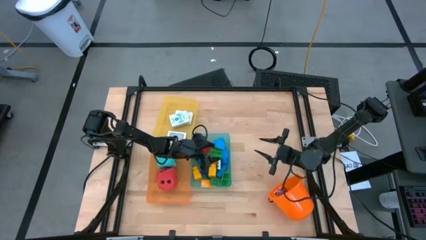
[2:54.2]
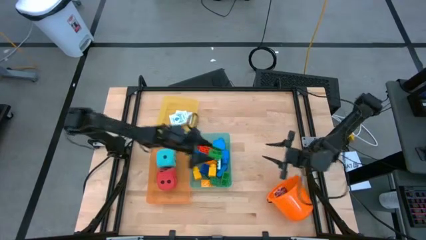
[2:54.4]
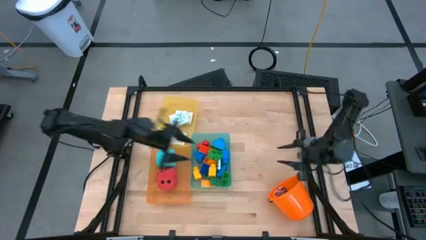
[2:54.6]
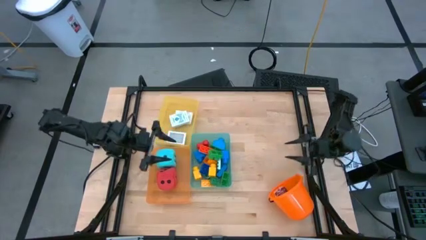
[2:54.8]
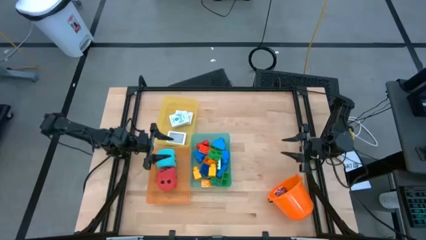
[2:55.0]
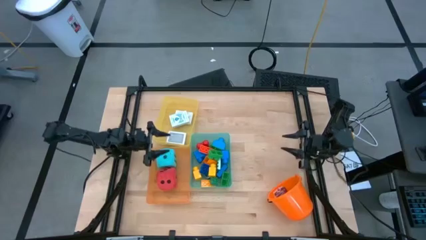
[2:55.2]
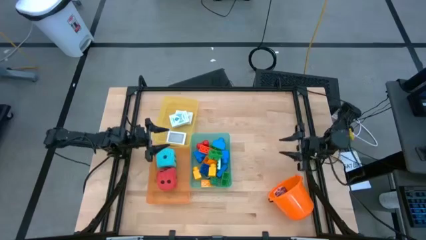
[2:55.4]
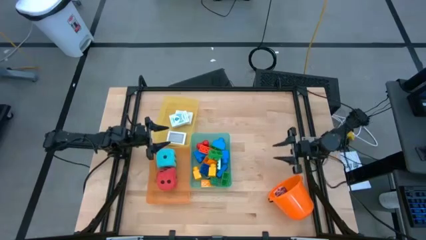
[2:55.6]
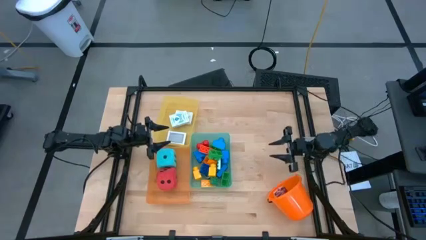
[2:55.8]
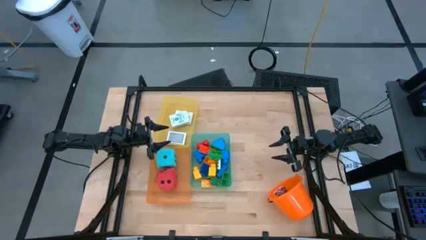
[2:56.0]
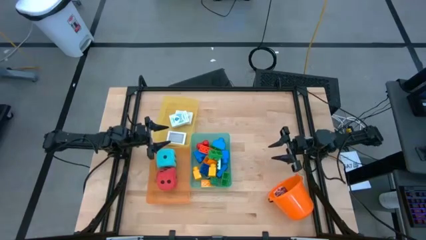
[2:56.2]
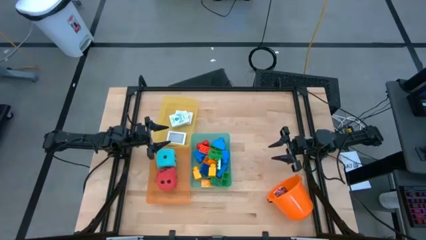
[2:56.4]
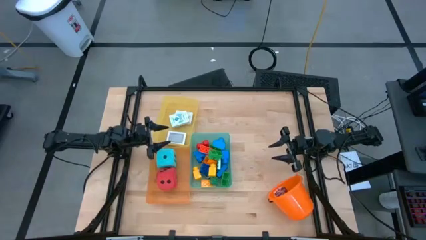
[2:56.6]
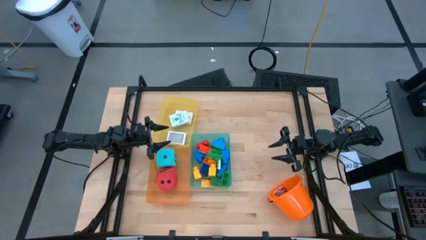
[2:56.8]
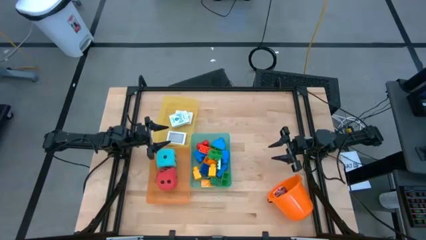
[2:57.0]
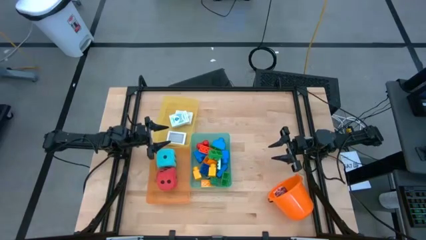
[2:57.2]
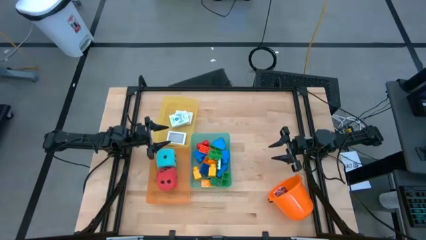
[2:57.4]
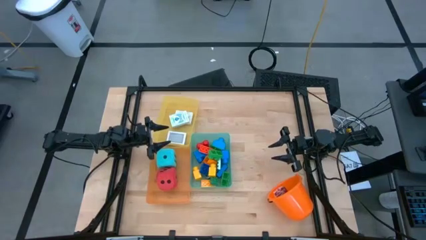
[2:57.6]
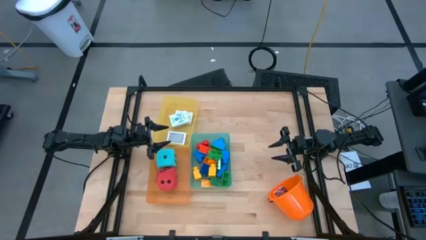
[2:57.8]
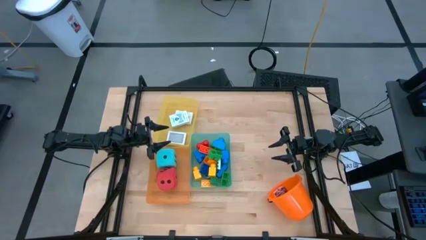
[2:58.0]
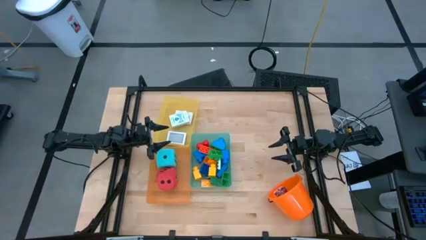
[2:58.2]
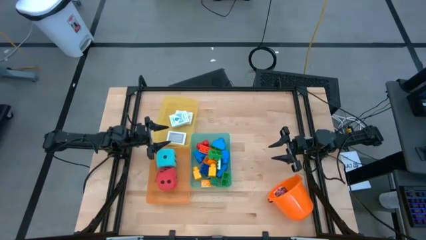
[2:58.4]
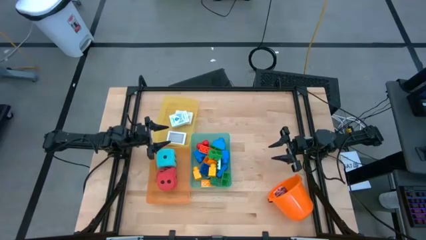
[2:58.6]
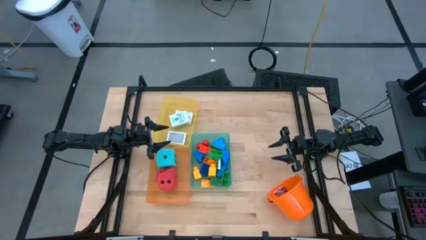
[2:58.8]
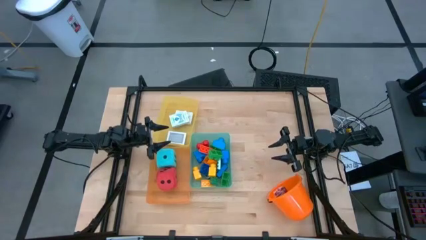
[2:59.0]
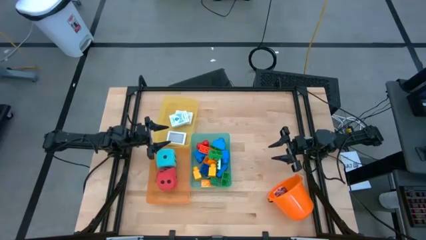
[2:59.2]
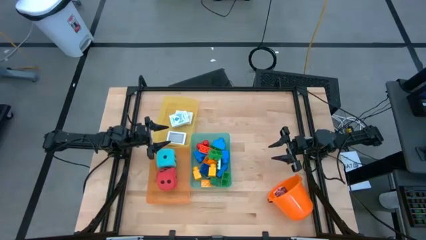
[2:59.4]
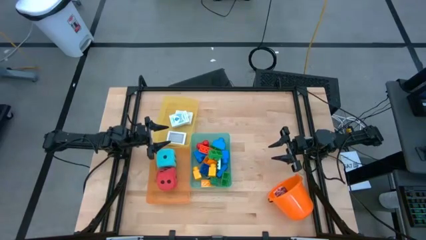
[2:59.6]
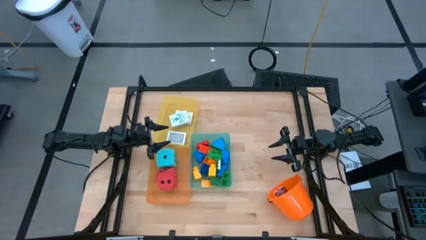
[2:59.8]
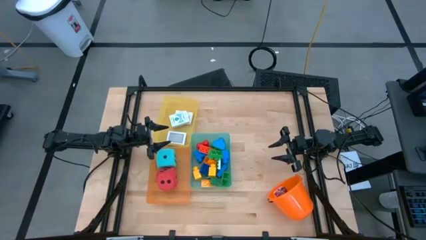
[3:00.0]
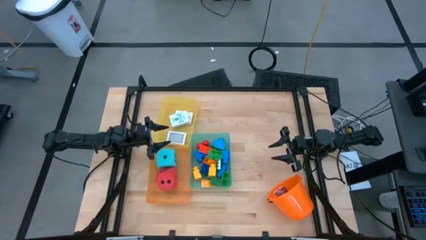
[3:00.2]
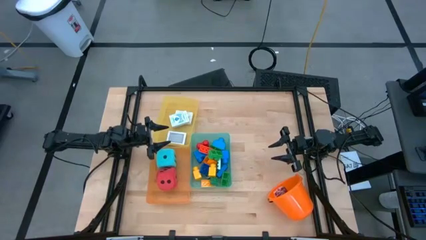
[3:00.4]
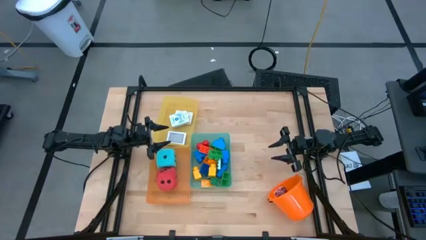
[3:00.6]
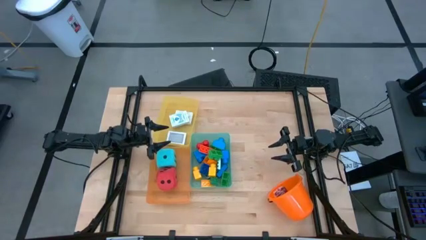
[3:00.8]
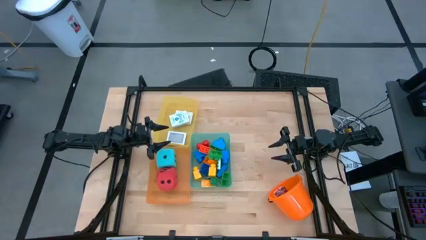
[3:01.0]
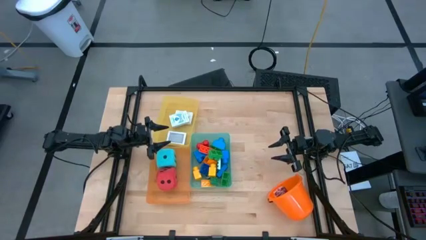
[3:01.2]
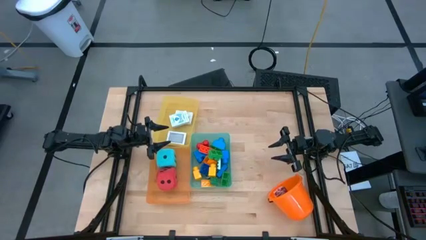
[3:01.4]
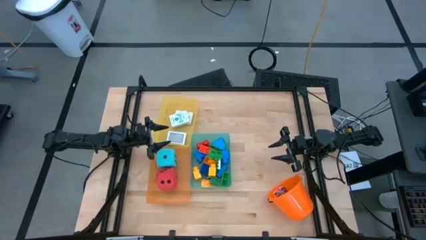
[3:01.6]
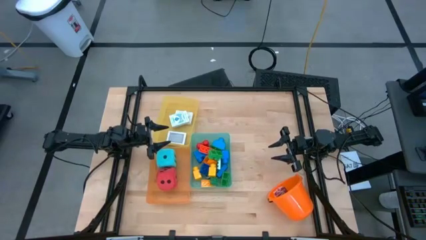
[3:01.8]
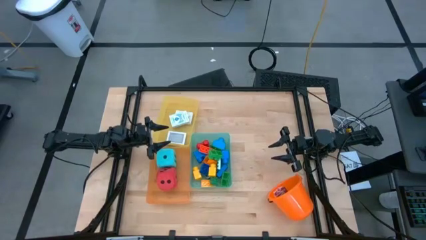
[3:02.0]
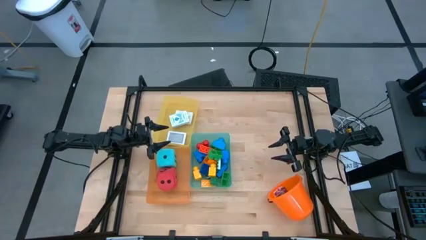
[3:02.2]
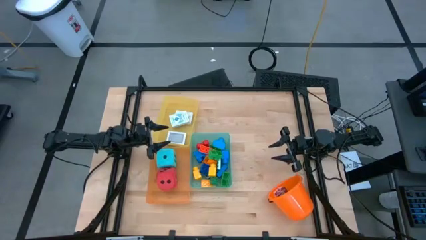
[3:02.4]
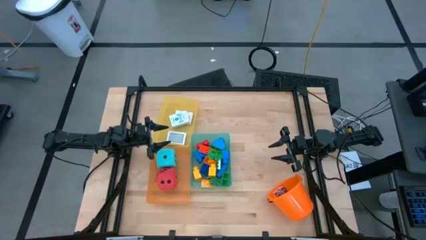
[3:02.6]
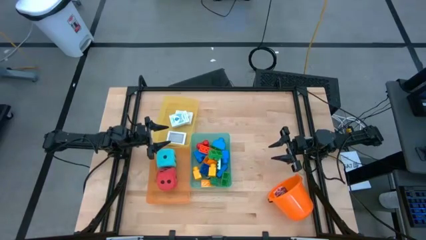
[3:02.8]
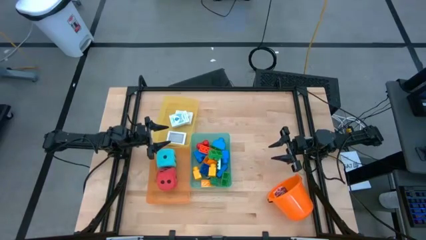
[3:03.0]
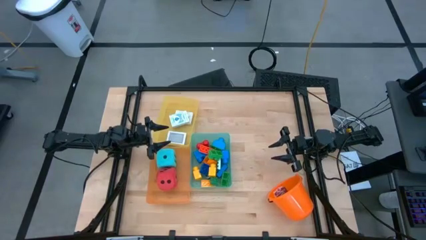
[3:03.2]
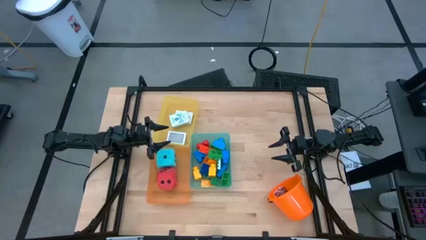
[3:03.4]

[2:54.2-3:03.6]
Task: Pick & Place Toys
Return to Home Position

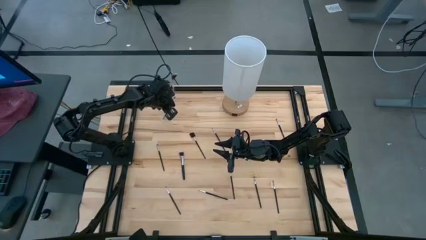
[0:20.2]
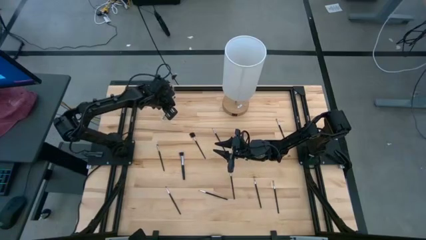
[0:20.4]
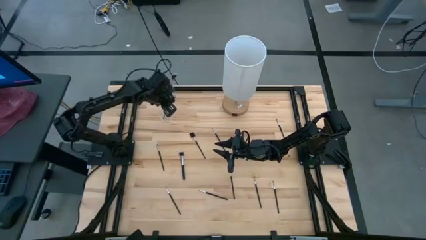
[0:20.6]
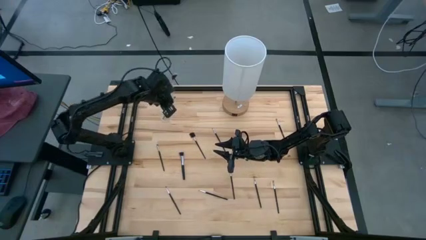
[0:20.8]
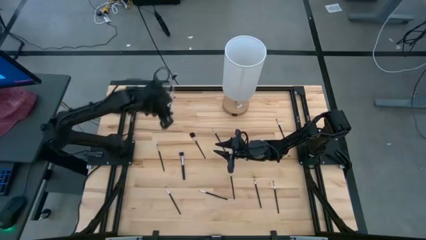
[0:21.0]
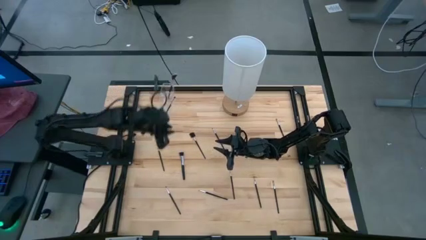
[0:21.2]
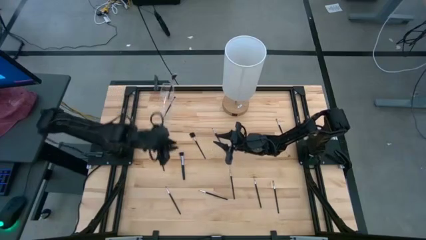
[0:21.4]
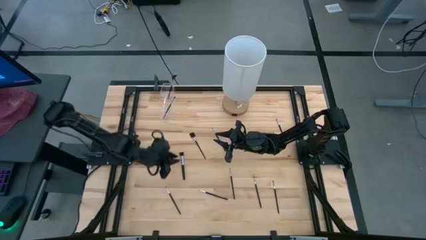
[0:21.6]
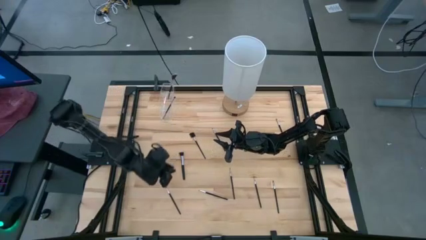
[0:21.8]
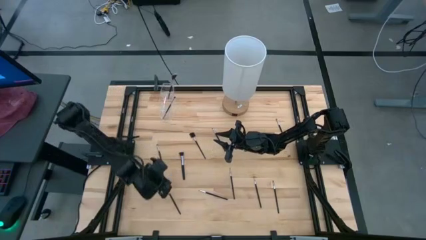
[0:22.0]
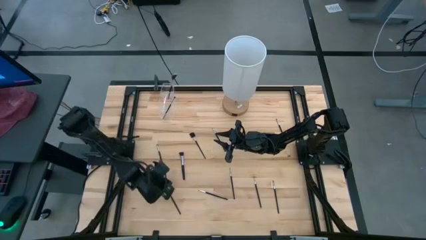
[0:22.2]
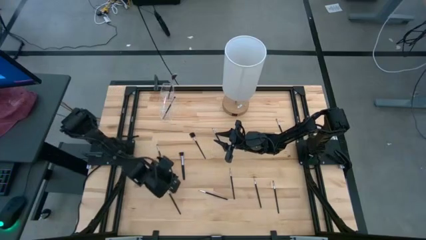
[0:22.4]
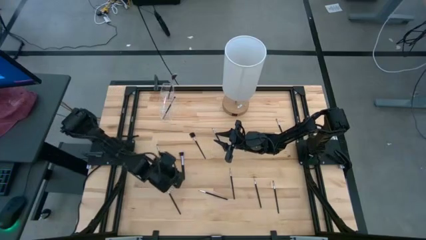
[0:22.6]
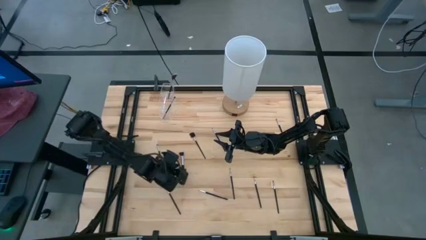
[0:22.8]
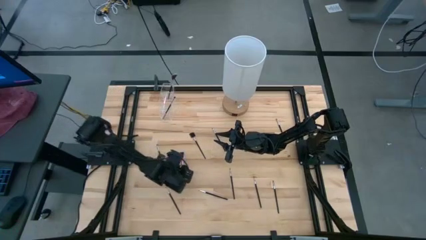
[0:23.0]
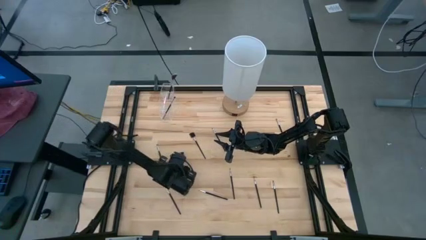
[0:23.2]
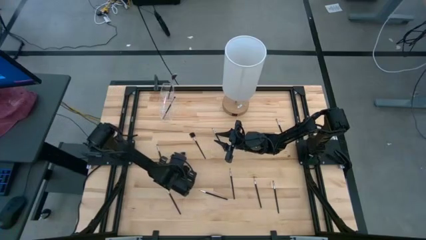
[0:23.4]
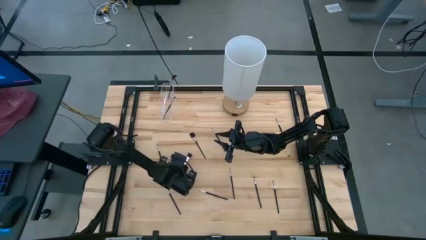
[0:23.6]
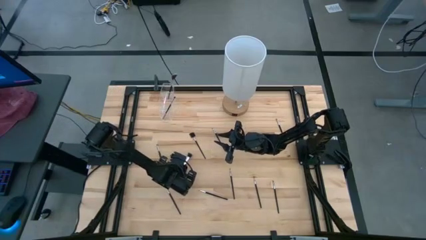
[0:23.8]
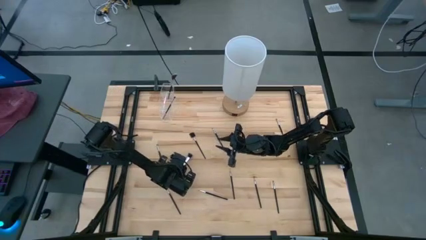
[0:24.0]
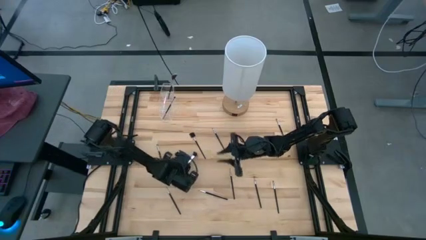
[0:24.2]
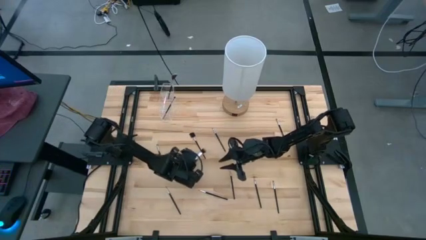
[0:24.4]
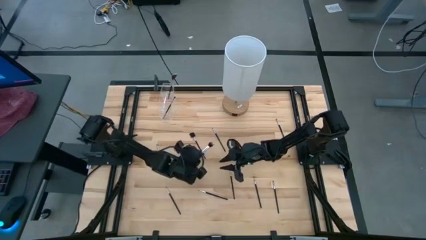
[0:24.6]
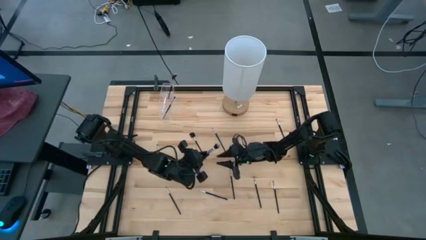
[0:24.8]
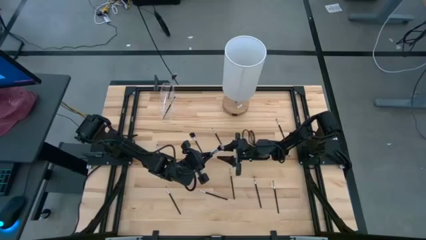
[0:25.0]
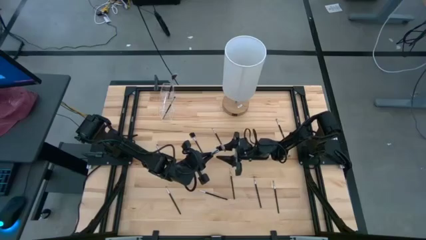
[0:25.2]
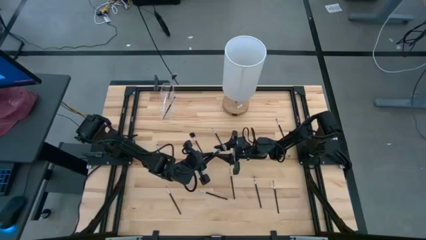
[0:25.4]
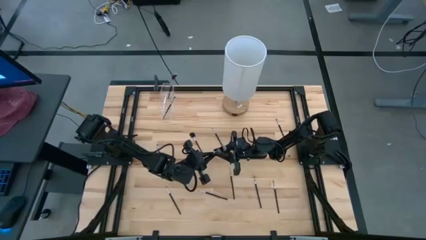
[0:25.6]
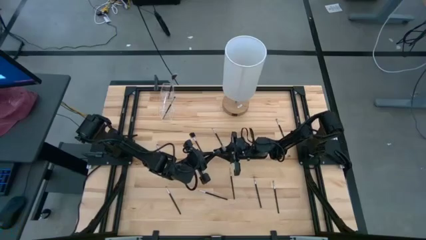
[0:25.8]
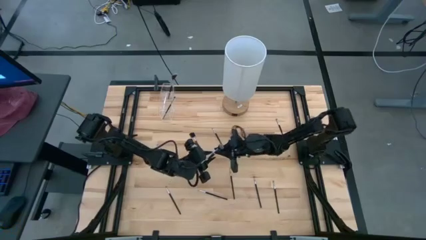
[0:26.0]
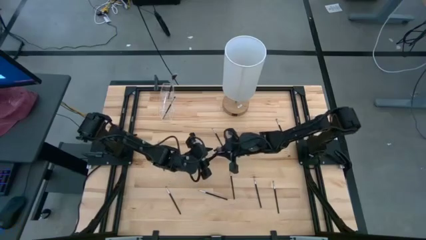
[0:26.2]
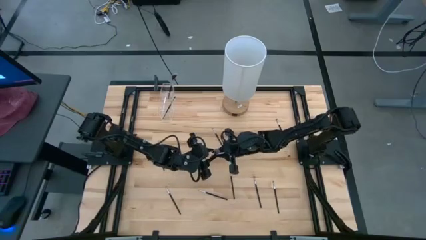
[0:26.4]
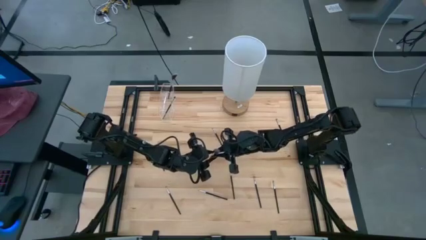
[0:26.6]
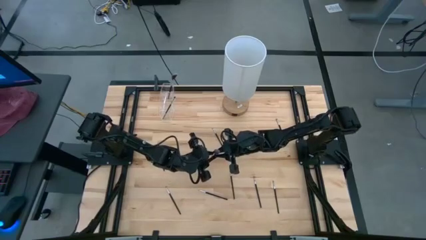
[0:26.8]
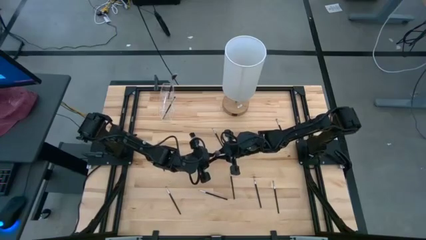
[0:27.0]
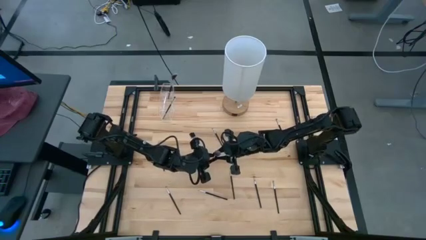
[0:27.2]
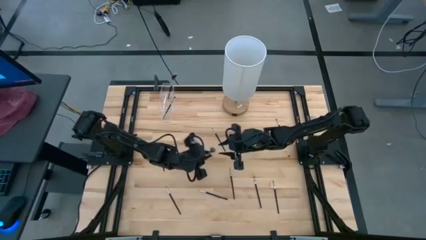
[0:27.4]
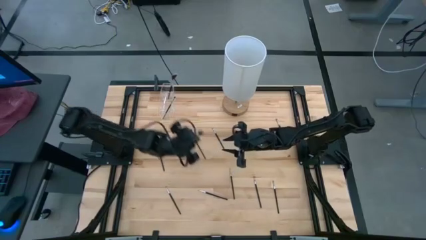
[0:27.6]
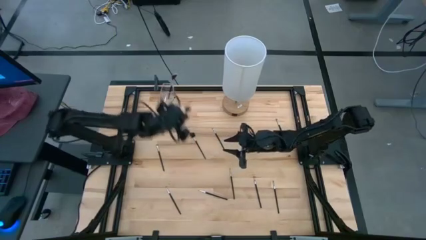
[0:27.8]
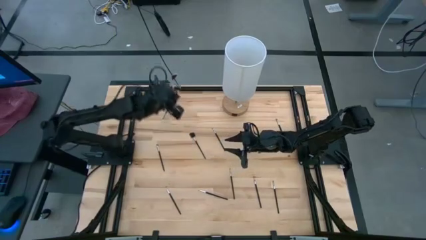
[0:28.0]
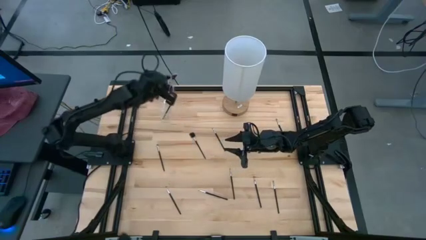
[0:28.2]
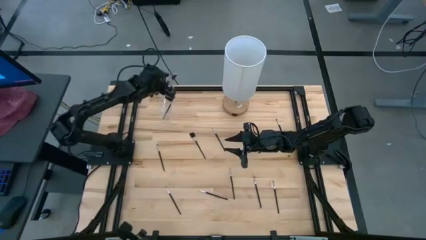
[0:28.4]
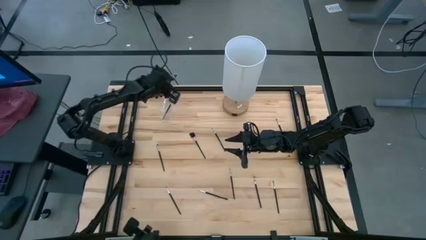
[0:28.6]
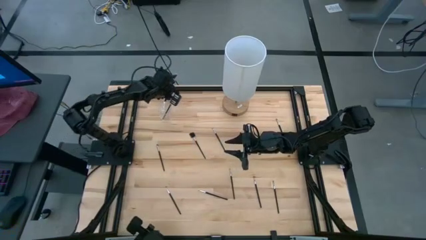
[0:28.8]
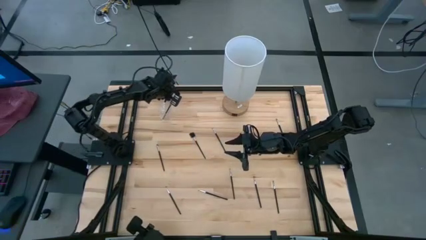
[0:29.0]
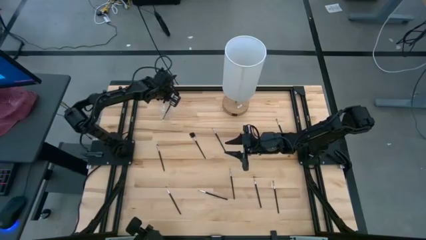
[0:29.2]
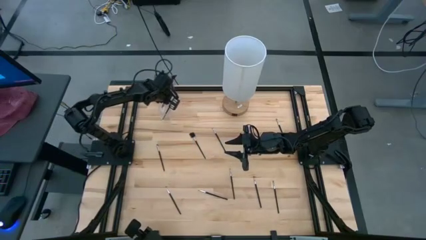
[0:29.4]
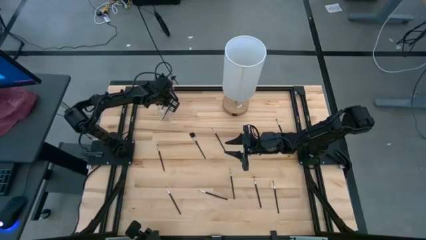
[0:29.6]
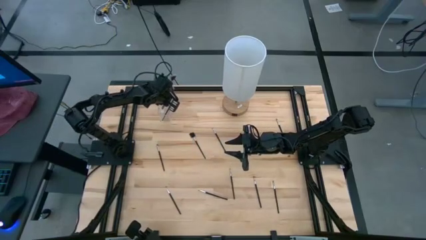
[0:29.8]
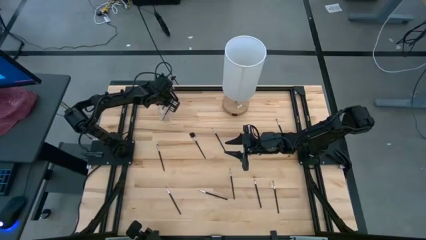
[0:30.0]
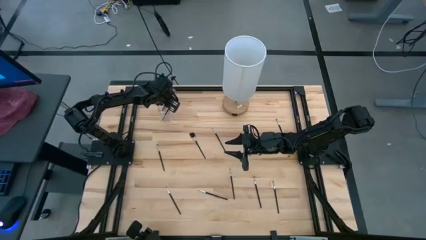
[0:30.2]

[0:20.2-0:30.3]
Task: Put items in baskets/containers
Put the black powder brush into the transparent organizer
